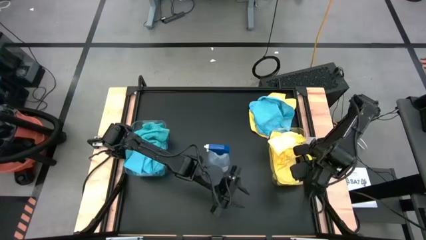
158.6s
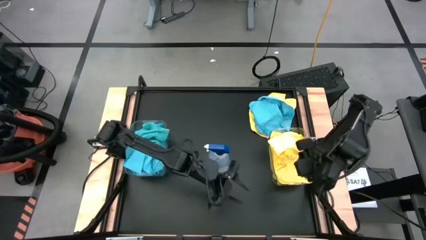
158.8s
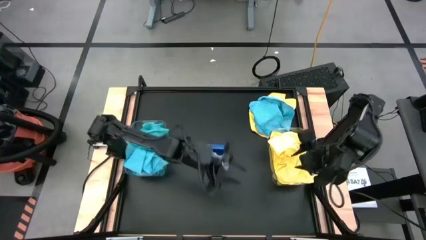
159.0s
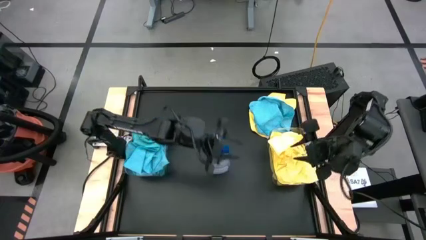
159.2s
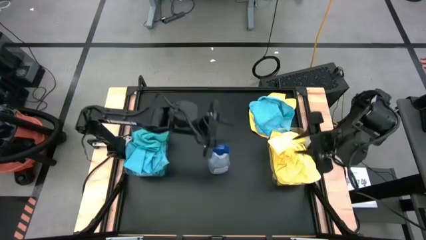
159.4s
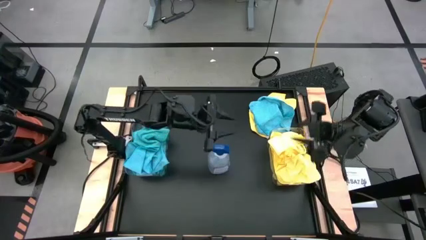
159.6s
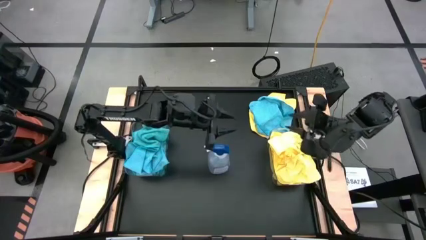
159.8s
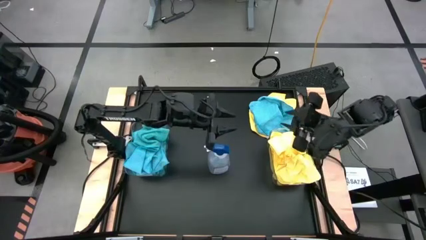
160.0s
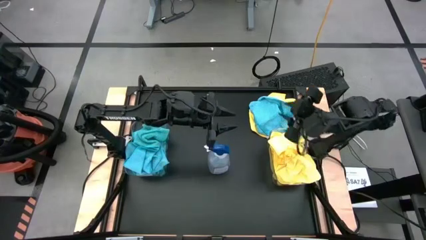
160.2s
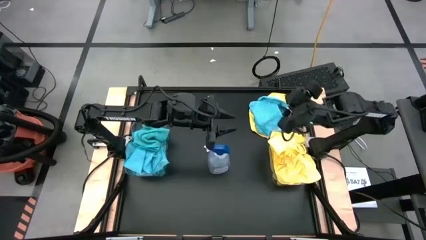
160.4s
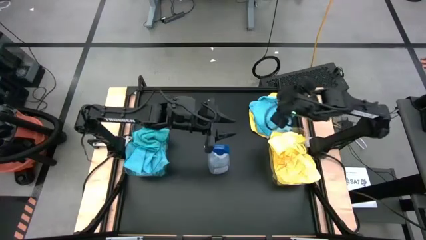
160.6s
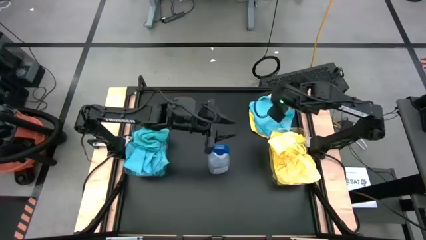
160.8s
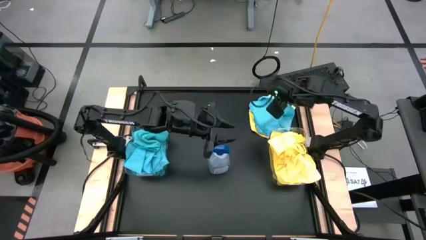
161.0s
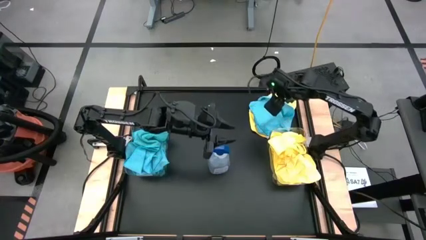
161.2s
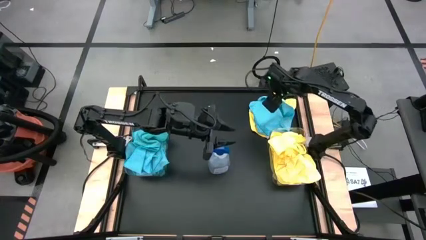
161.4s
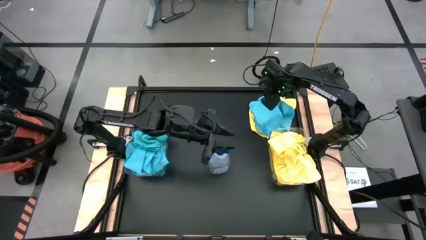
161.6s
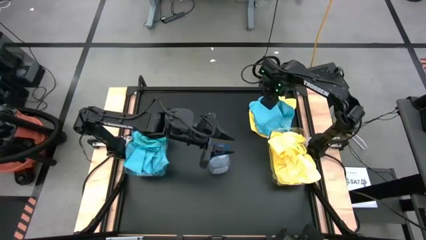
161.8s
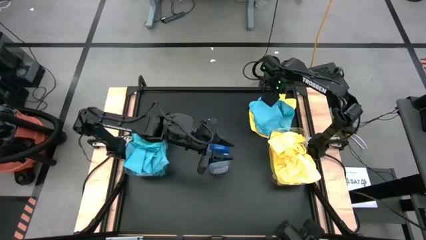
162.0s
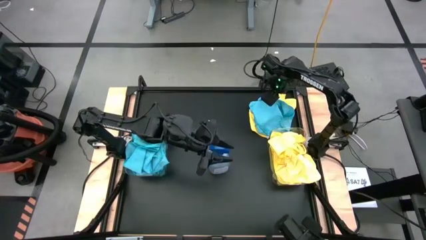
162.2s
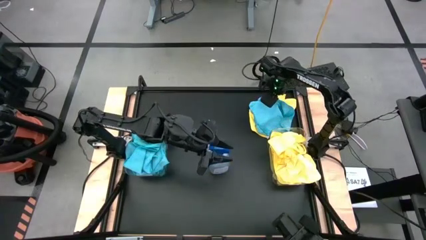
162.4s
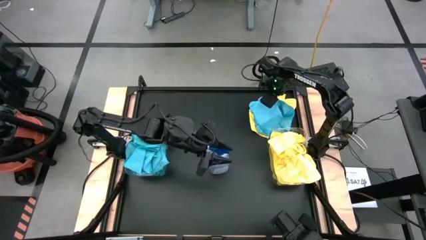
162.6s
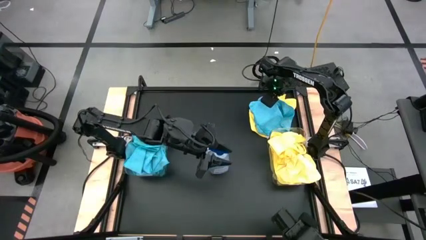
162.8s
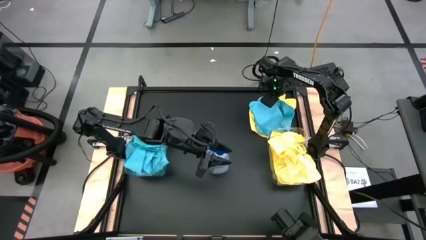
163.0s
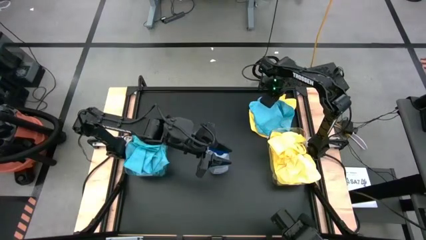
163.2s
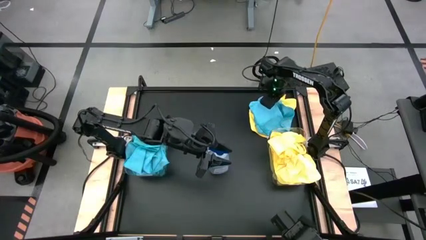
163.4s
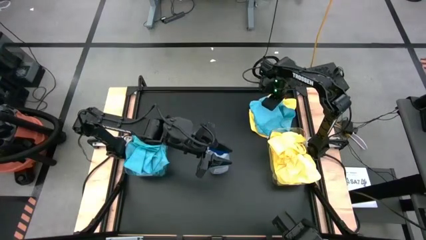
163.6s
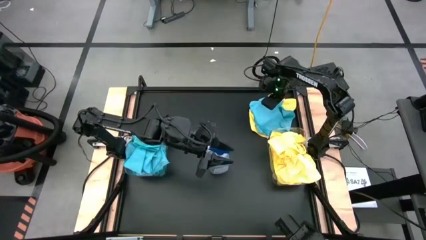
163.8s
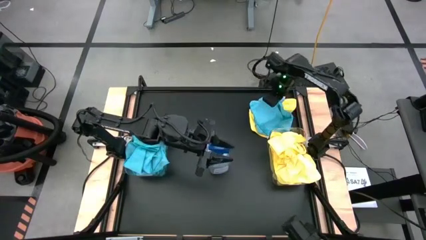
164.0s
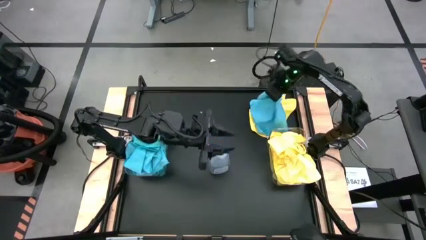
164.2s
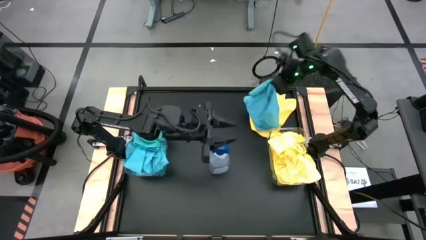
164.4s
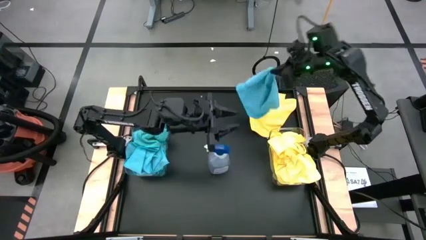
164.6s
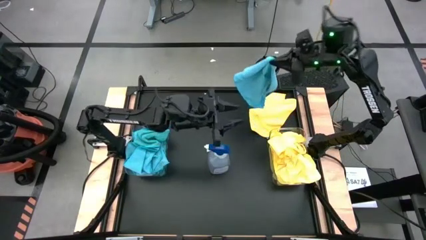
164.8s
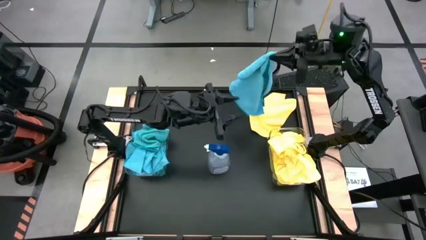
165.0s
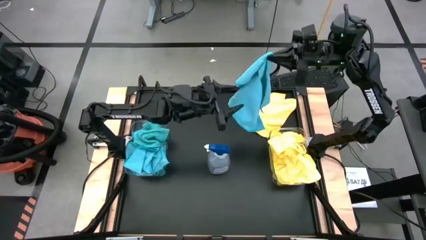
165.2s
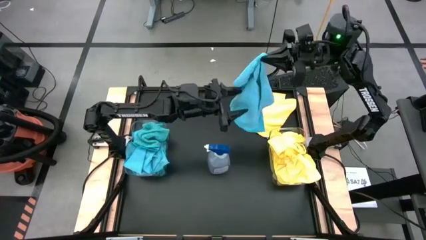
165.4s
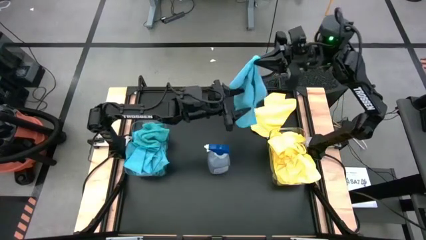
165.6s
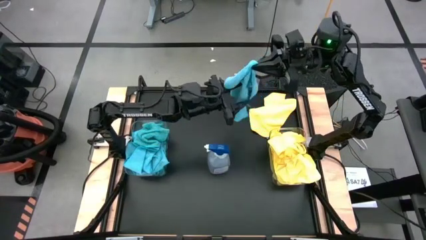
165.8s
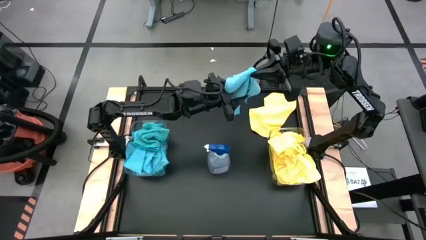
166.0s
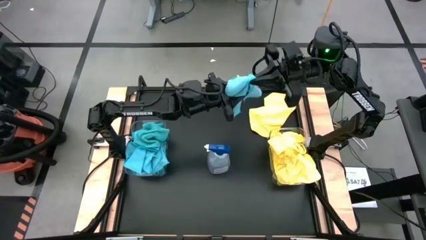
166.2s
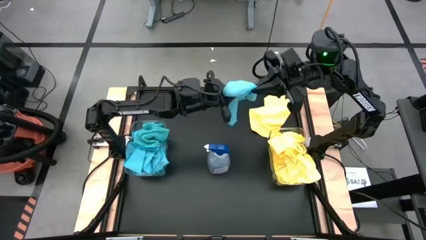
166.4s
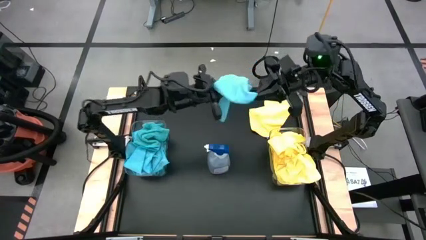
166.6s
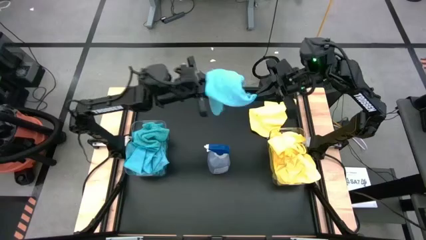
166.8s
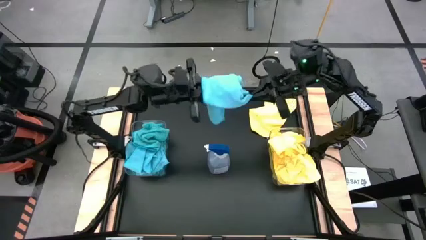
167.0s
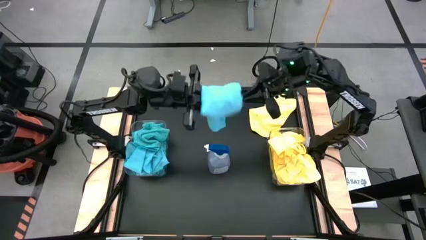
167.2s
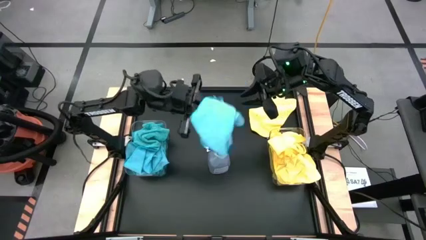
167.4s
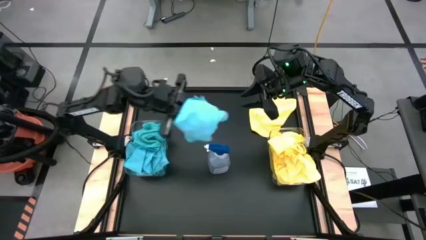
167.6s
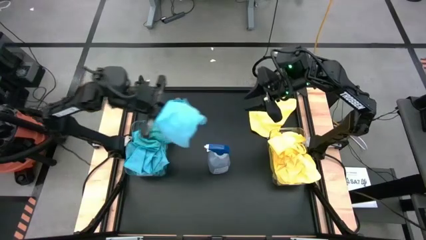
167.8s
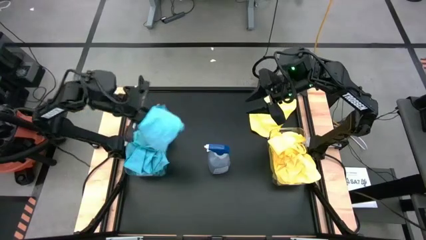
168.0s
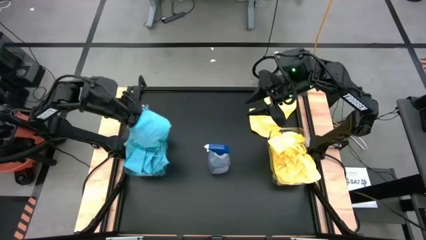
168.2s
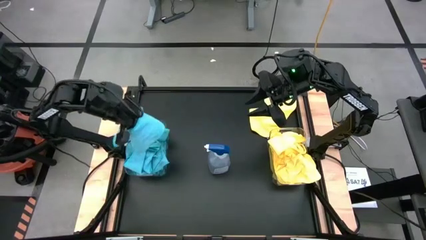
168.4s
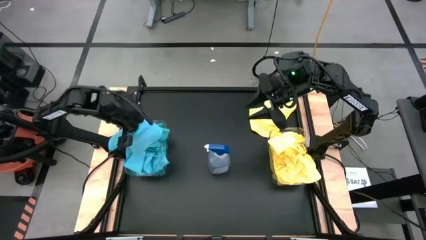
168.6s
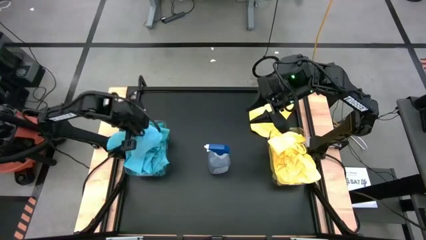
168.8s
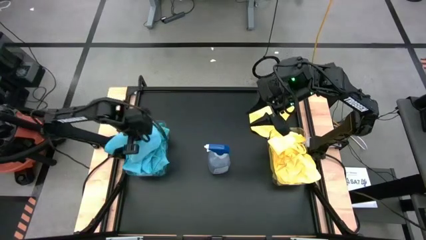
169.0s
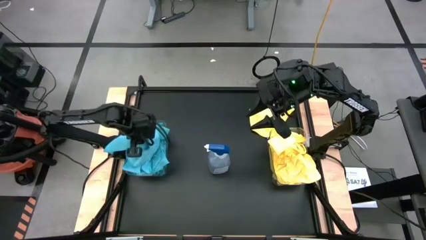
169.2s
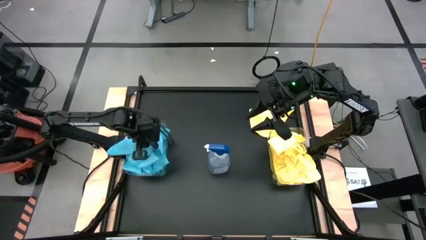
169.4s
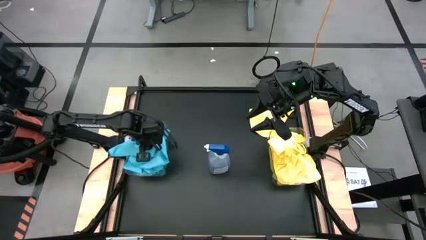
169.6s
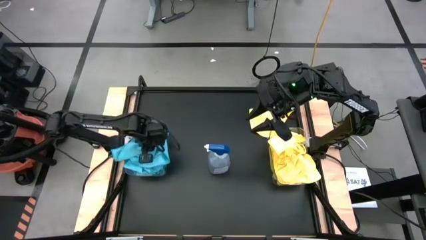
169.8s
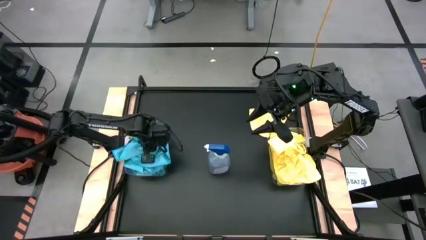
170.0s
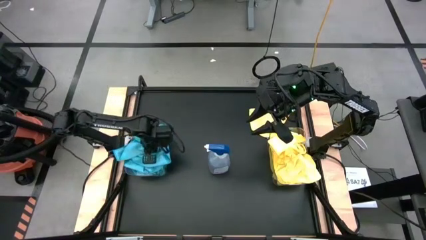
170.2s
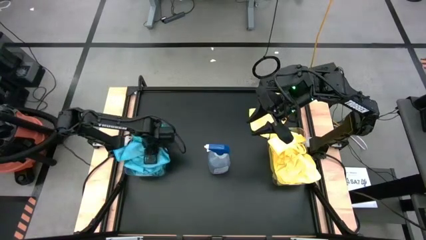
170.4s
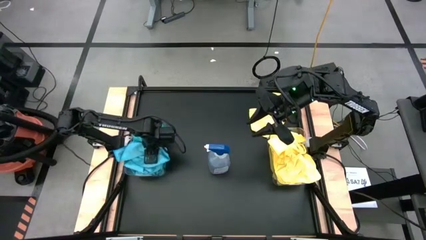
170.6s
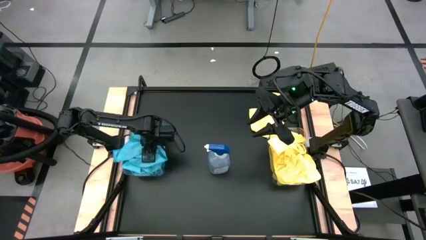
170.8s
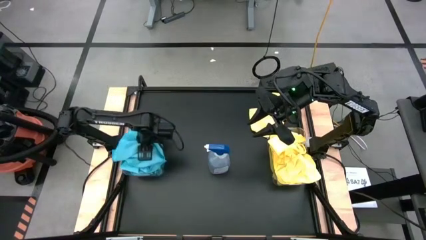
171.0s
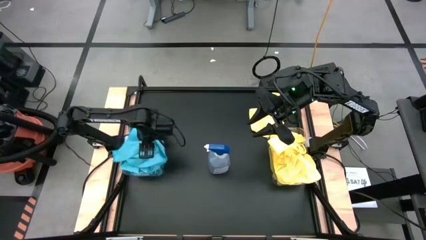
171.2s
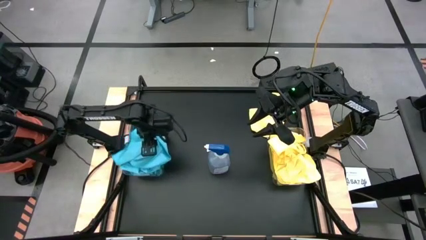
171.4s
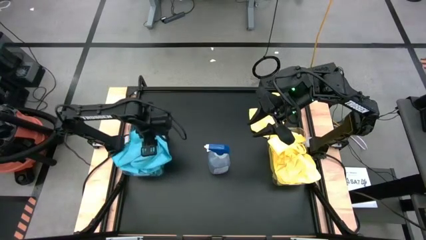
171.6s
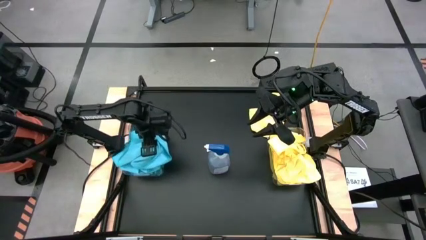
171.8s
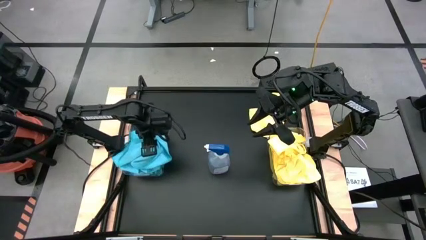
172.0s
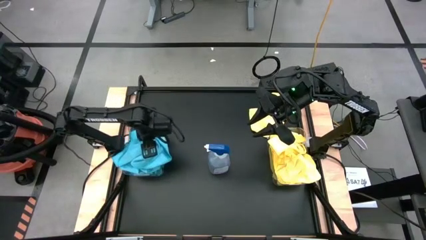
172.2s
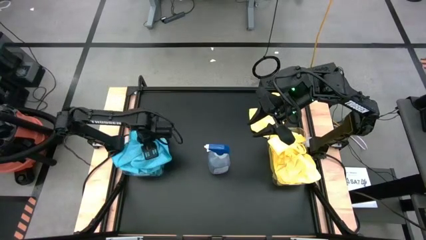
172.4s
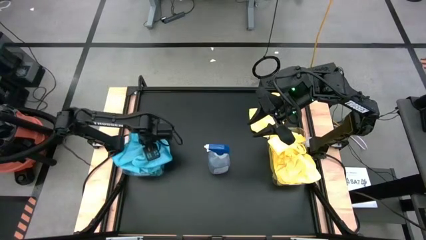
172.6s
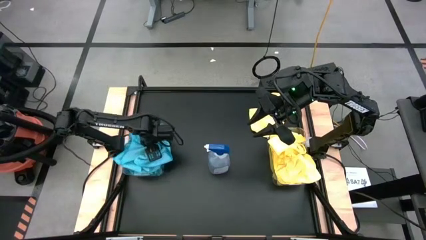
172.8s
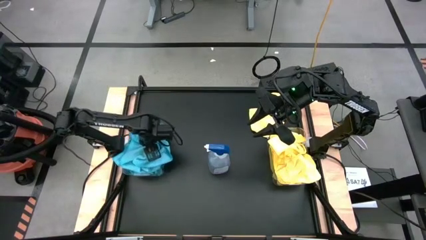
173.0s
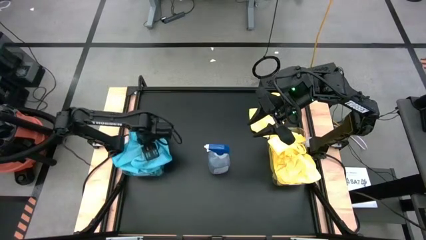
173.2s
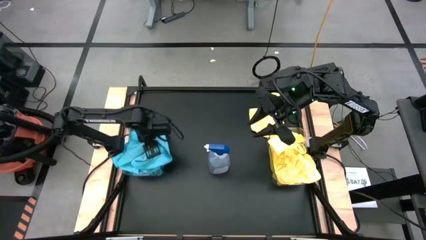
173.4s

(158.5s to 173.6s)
Task: Sort microfiber towel by color & place in baskets
Put the blue microfiber cloth into the left transparent bin

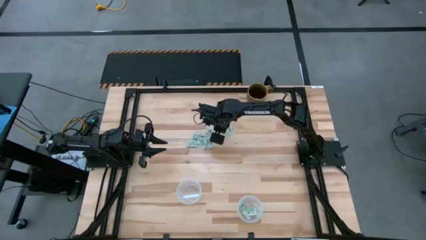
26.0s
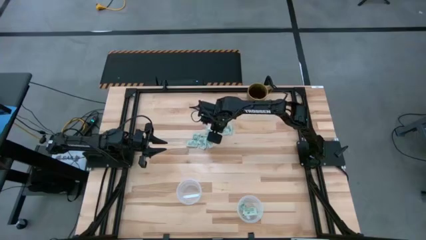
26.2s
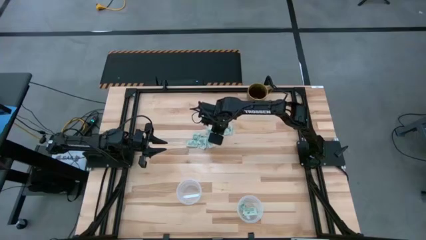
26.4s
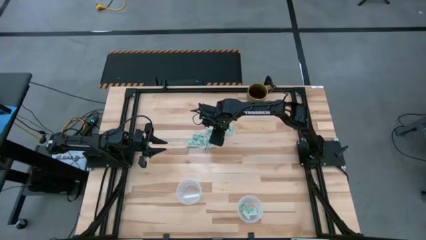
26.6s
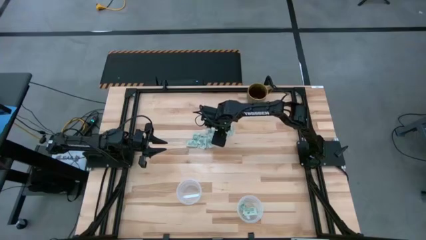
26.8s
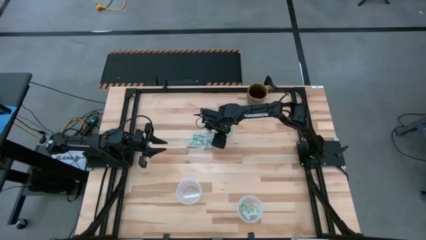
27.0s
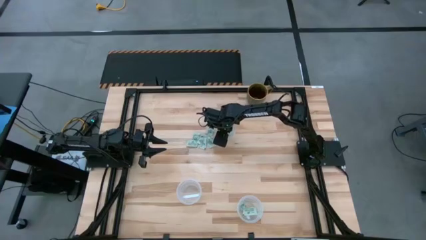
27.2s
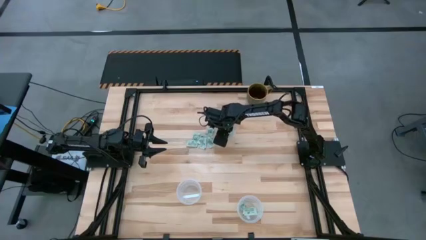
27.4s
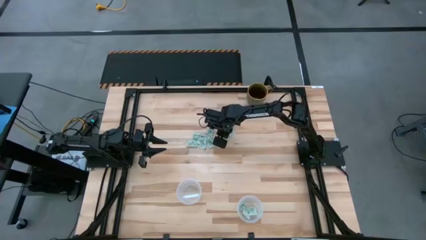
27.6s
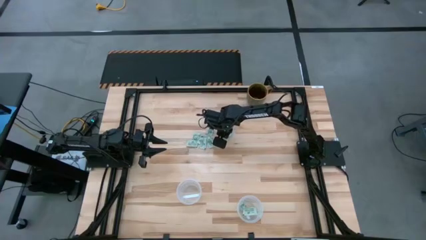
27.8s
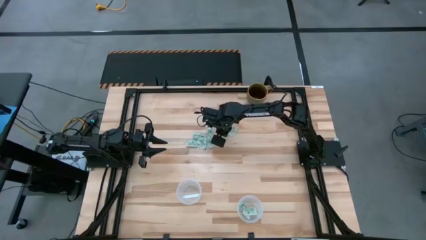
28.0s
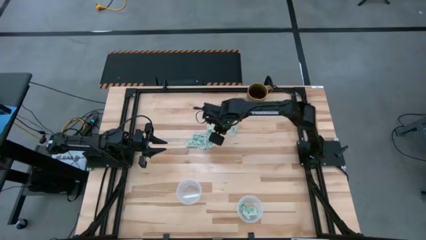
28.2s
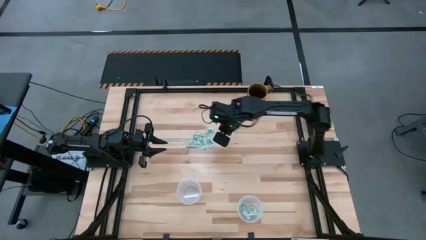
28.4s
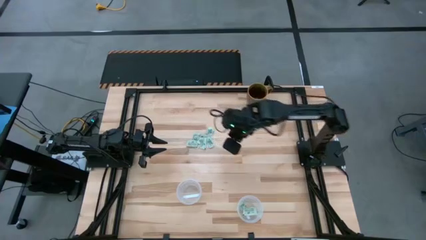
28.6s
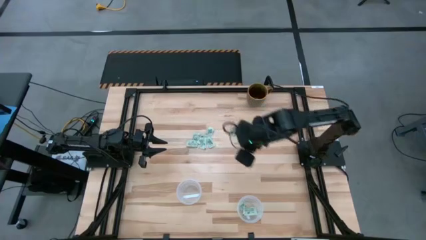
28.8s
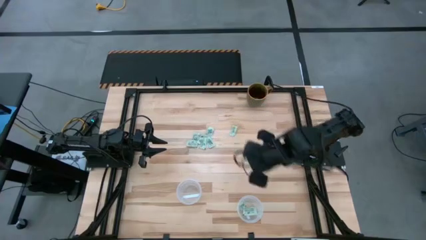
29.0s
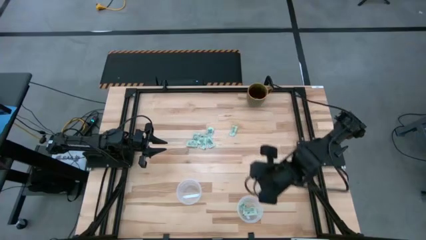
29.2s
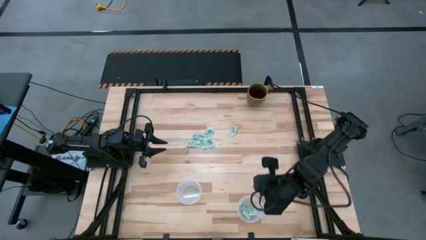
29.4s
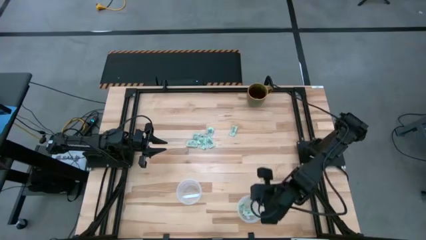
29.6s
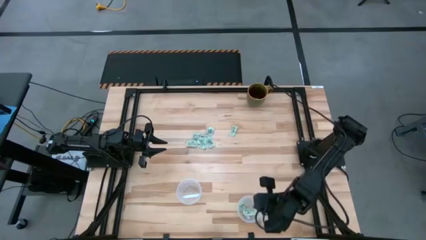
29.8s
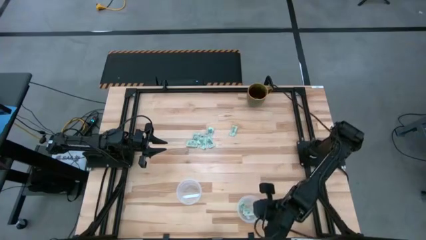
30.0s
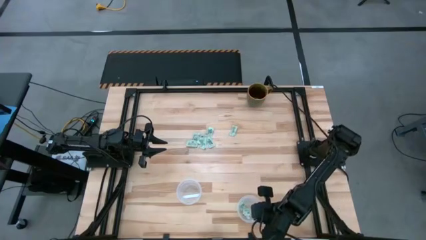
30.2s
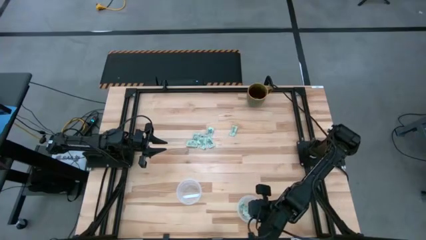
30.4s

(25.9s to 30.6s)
Task: Pick and place items into bin
Put the stevia packet into the right transparent bin
